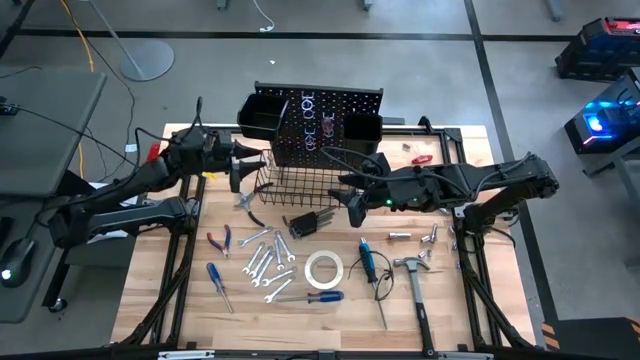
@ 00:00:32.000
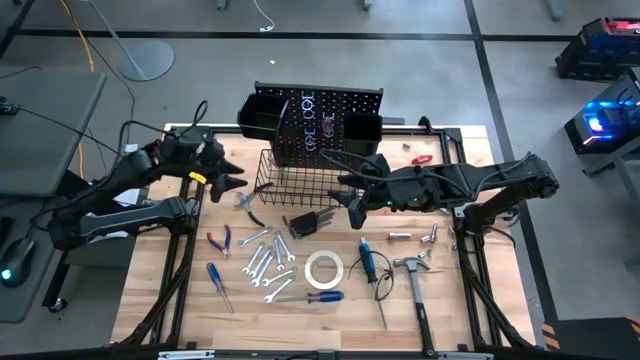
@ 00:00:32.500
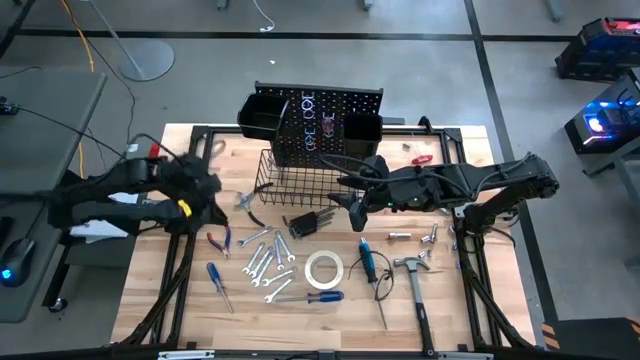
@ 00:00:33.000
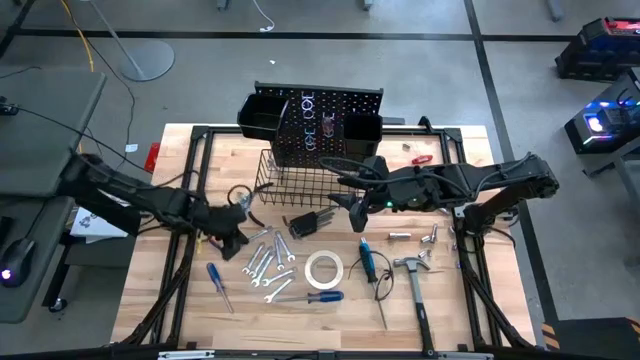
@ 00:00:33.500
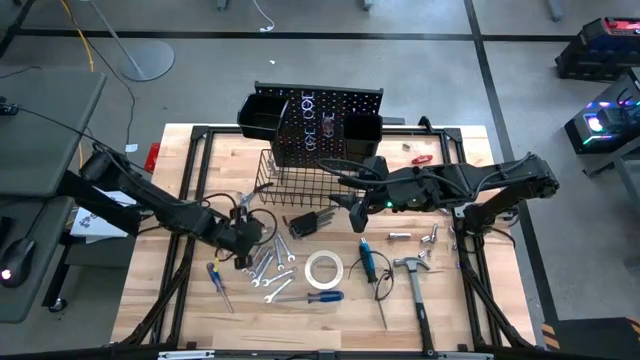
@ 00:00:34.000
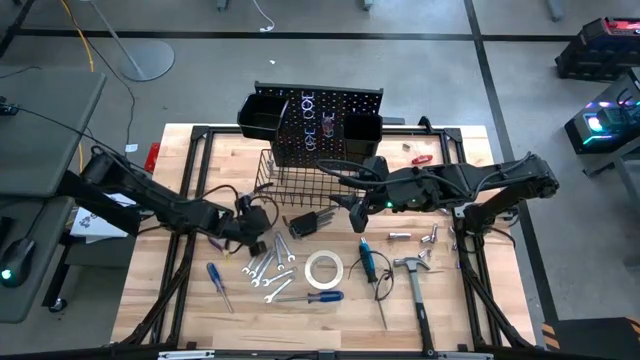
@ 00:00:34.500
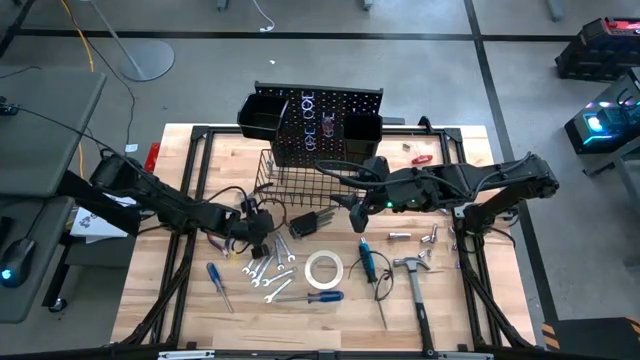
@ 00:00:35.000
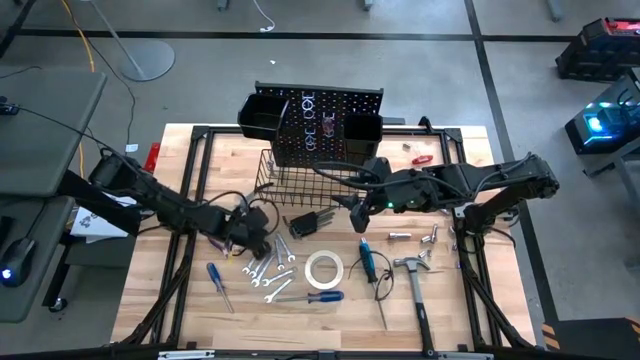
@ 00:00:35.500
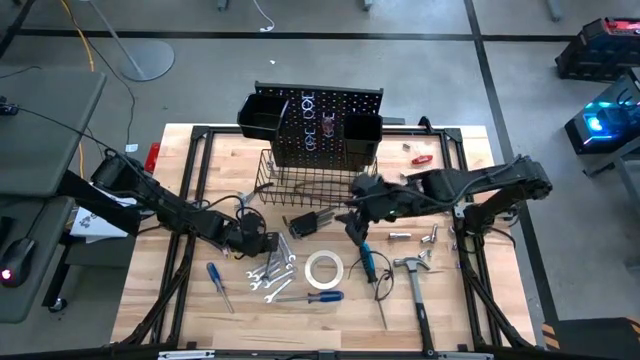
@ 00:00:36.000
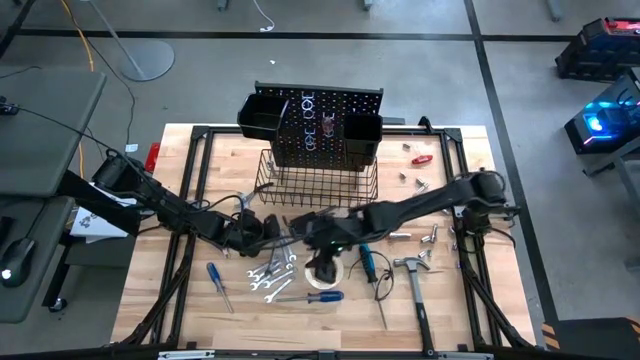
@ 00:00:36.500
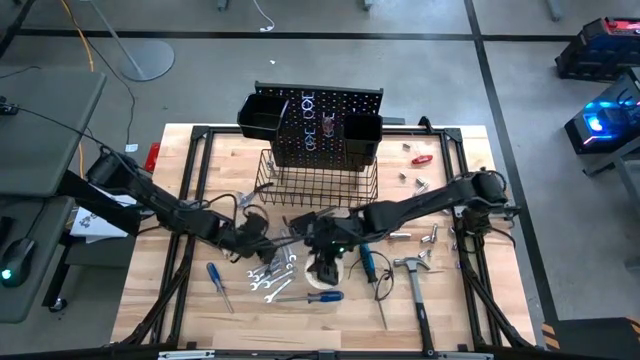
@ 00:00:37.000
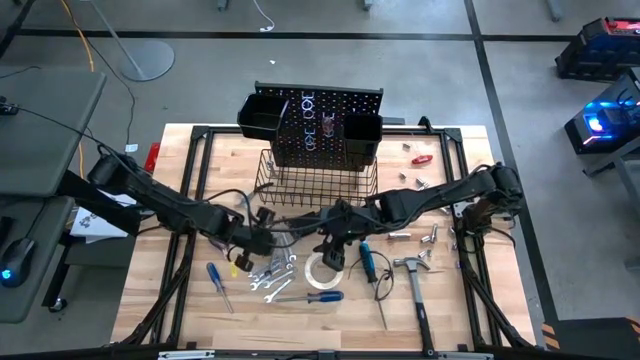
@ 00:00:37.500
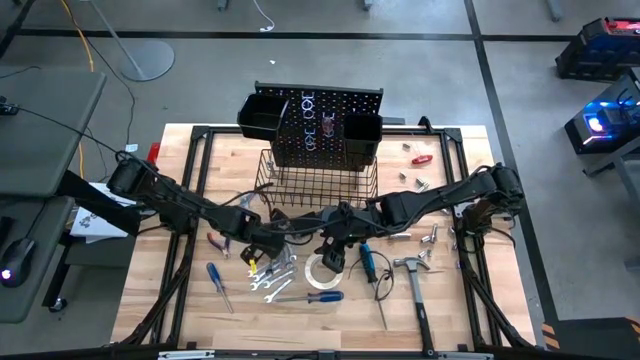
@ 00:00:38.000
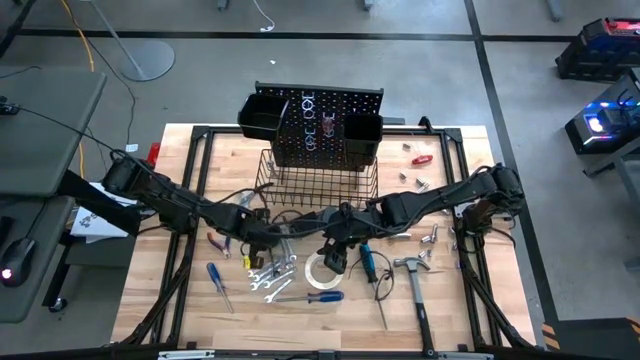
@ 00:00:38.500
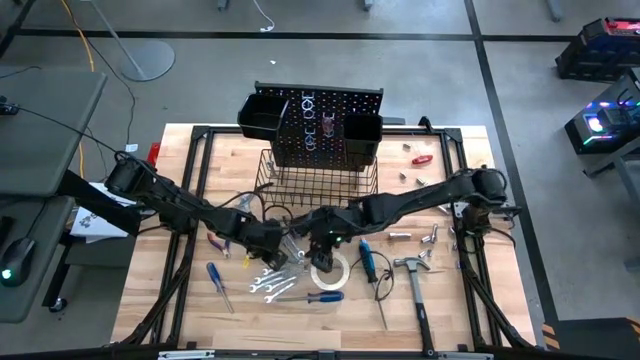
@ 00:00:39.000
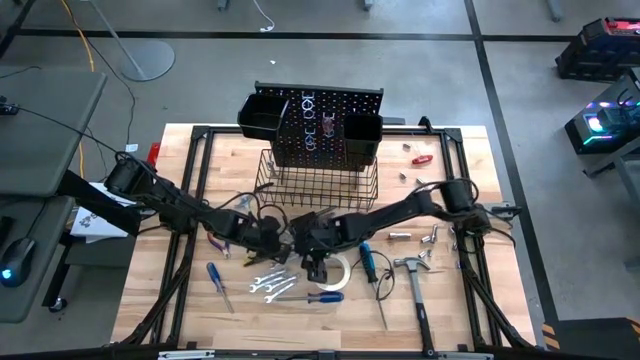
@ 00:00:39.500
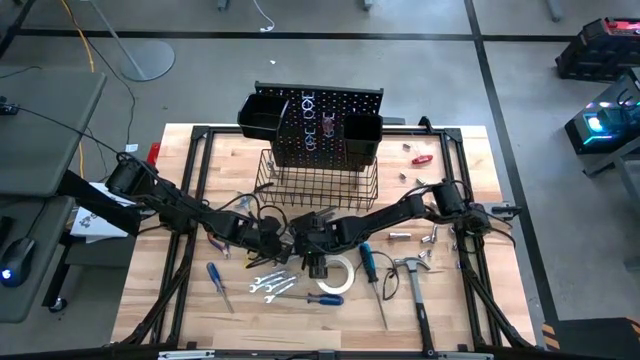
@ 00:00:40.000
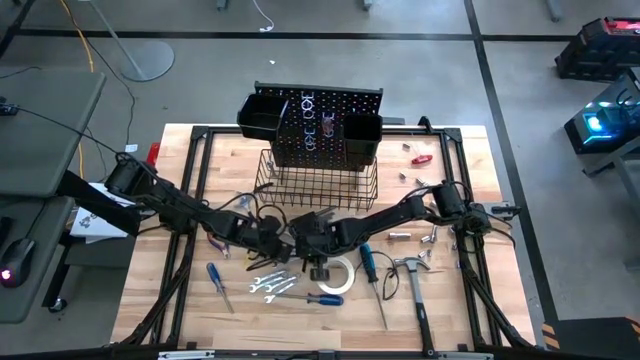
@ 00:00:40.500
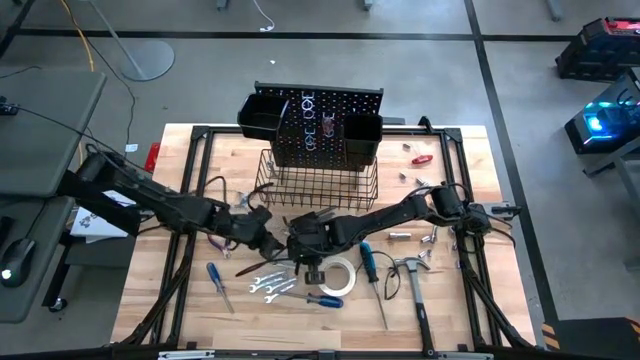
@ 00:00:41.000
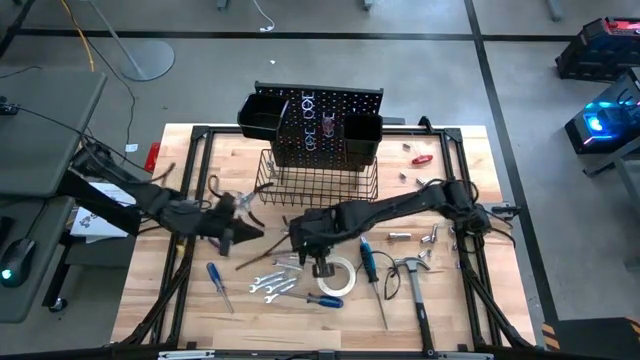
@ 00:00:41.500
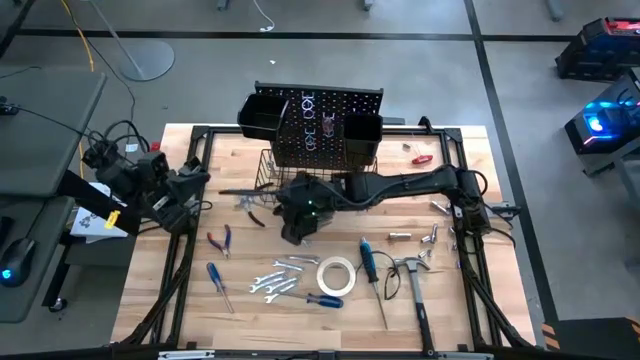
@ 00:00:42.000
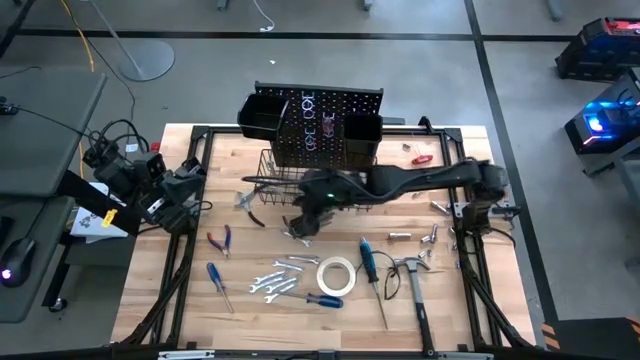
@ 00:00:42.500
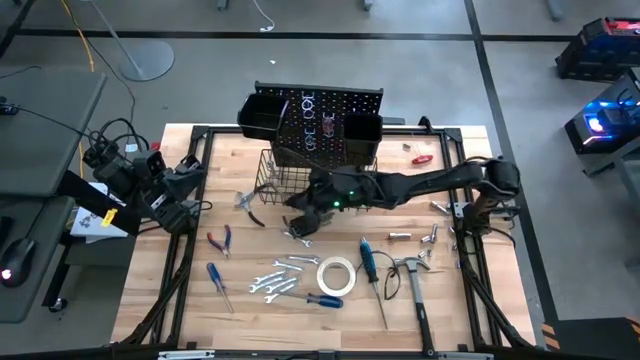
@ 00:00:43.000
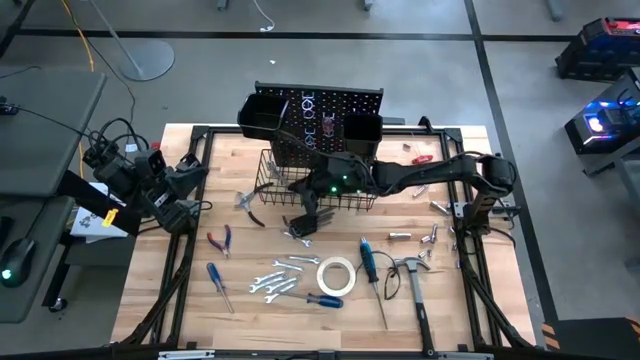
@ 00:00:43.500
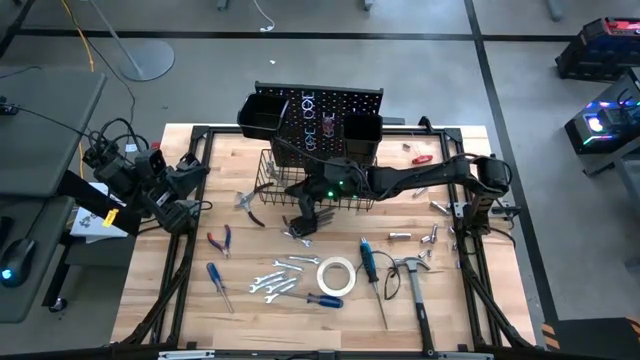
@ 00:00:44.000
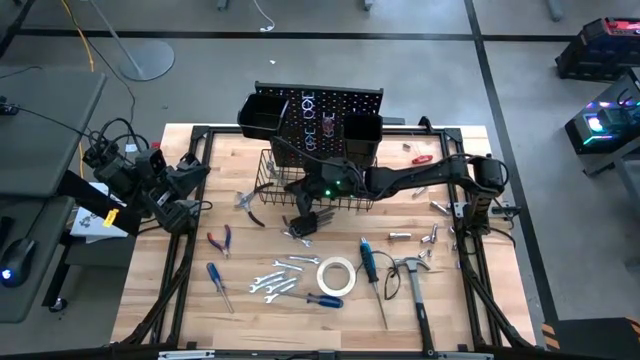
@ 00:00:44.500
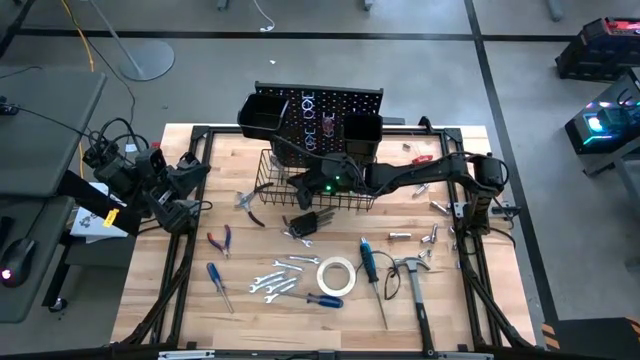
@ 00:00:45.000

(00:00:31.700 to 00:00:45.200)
Task: Hang tools onto peg board
Hang the wrench on the peg board

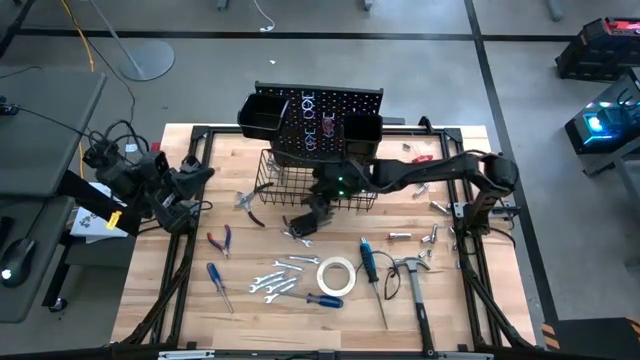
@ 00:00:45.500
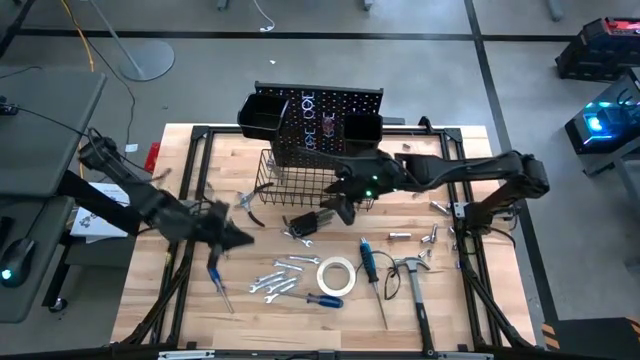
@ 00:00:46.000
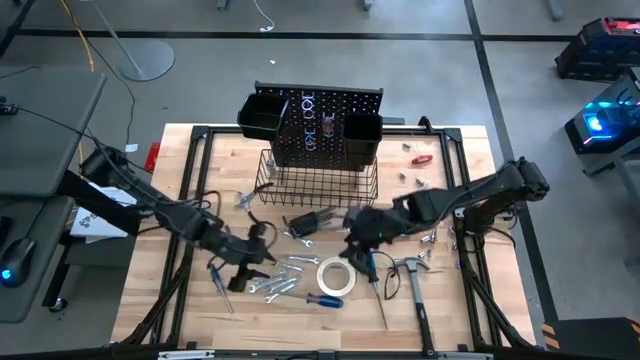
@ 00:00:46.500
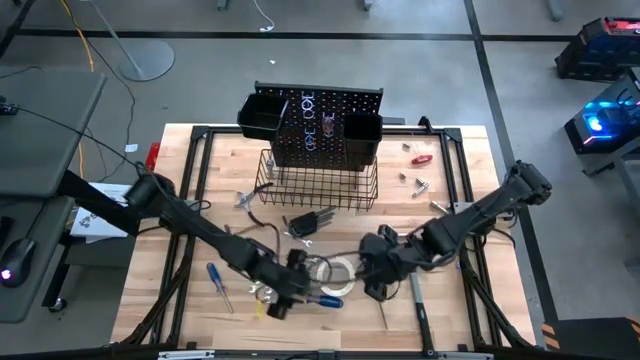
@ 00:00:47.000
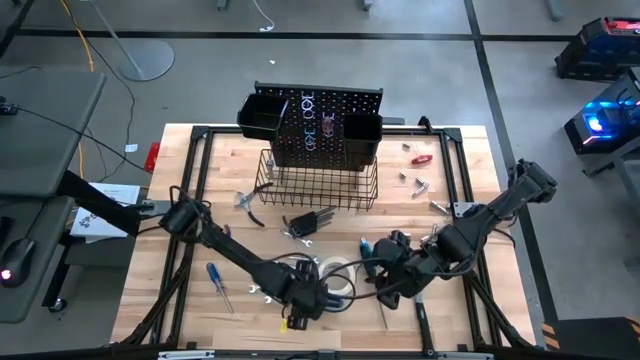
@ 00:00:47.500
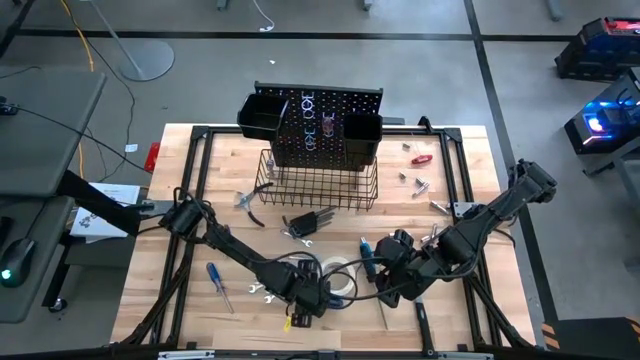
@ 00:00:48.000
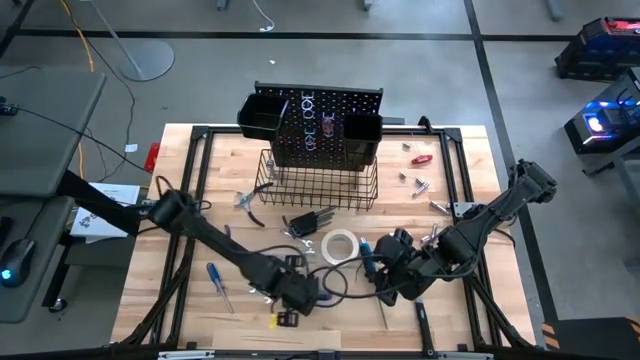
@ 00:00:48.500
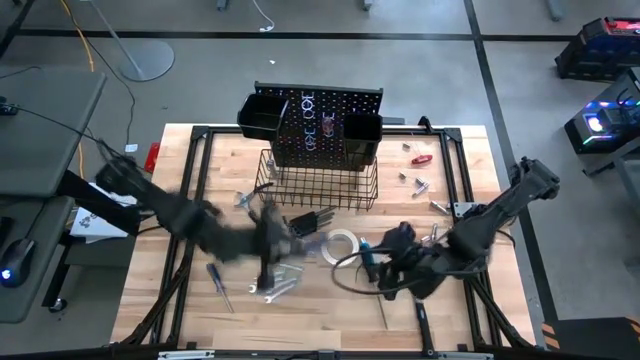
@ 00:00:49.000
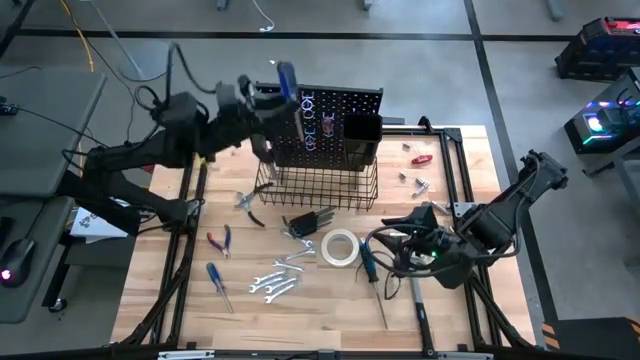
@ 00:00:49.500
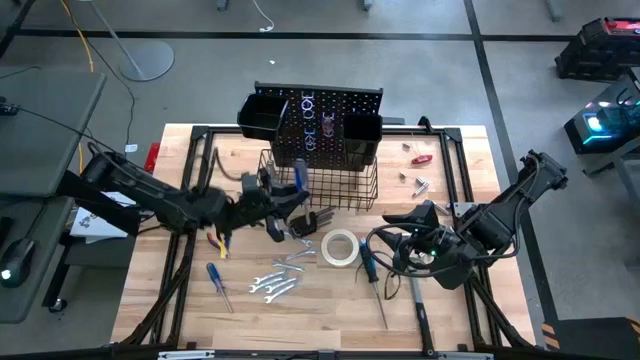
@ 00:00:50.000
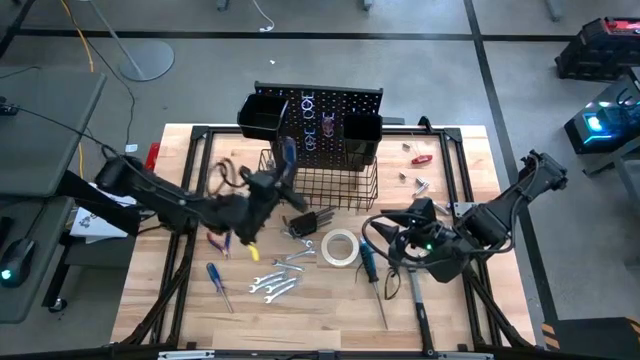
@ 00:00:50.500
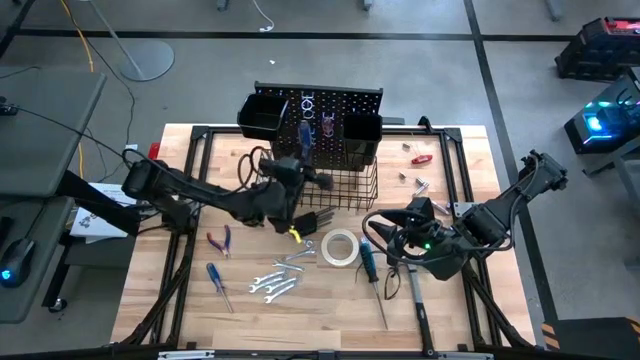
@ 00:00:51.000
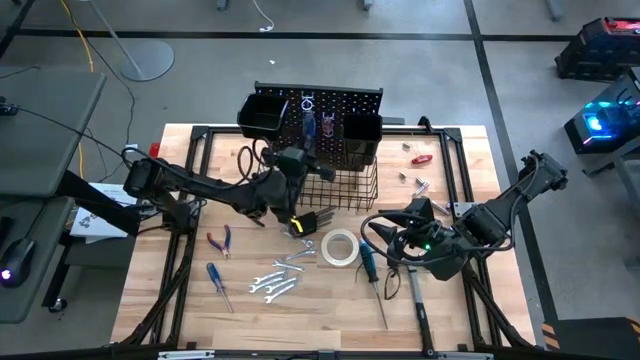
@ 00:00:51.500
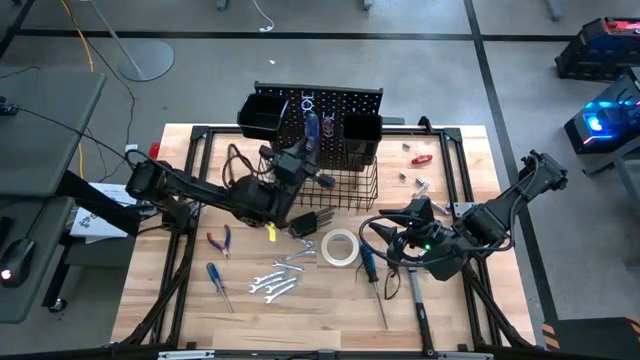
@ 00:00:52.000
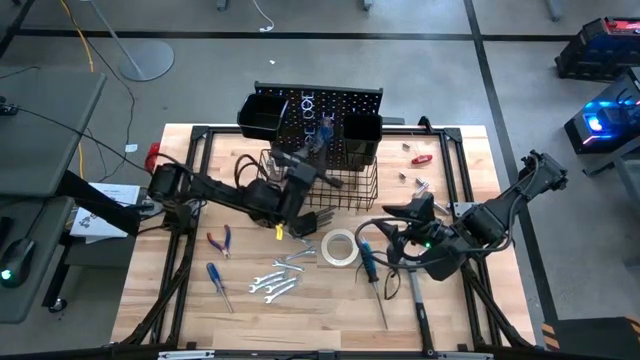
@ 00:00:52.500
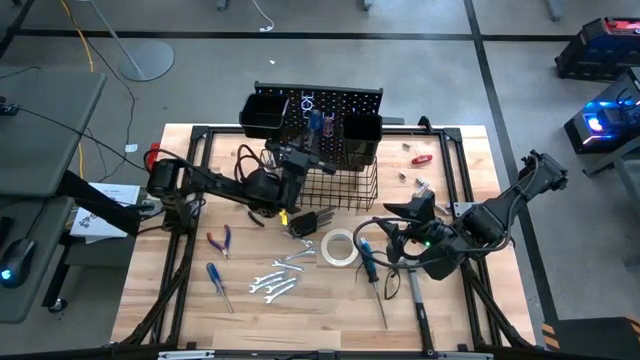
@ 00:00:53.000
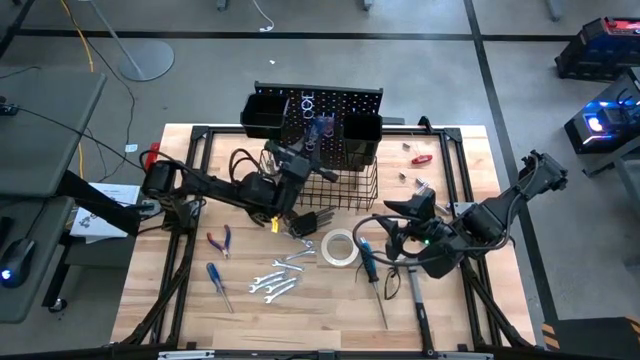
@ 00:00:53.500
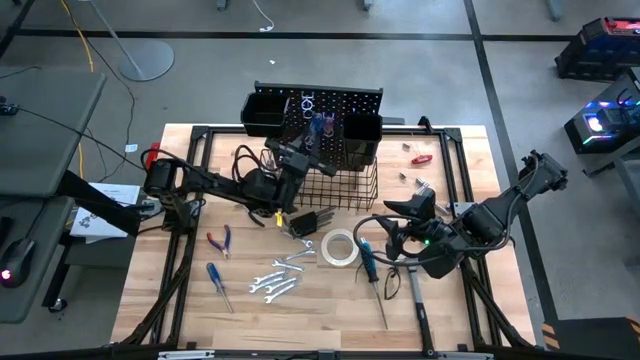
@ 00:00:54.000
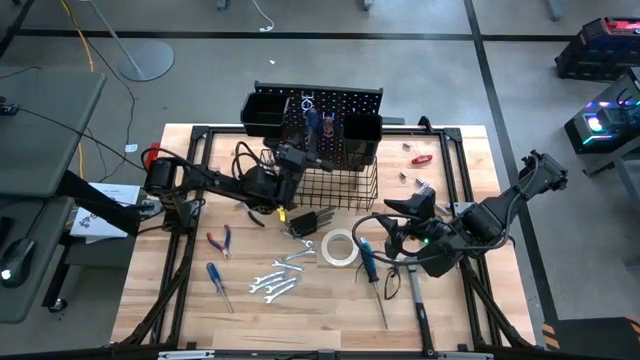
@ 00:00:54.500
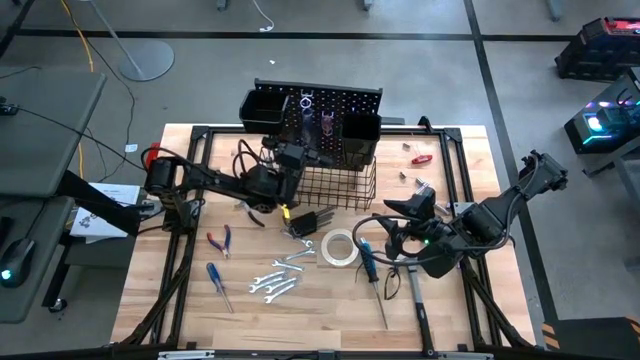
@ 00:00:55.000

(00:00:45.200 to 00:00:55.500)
Hang the blue transparent screwdriver on the pegboard
